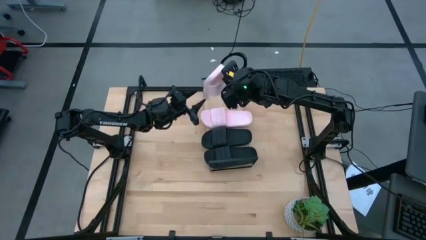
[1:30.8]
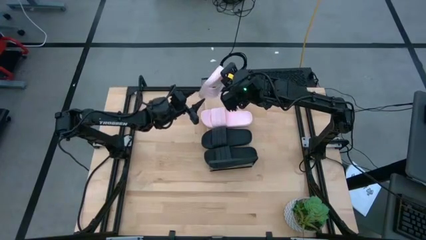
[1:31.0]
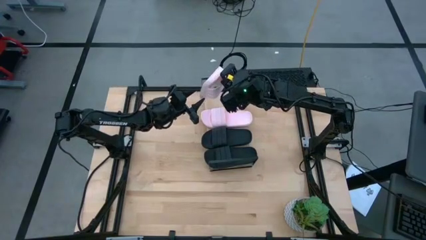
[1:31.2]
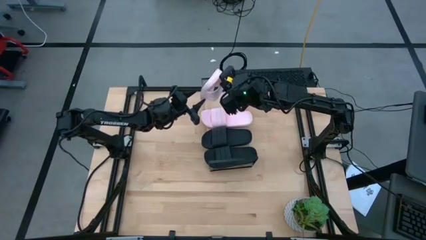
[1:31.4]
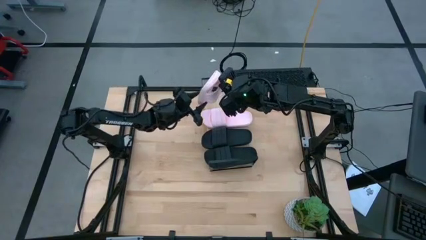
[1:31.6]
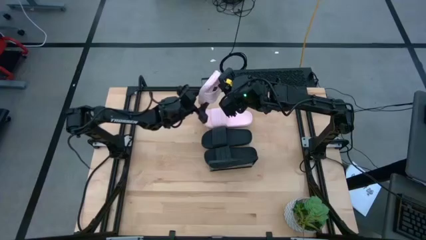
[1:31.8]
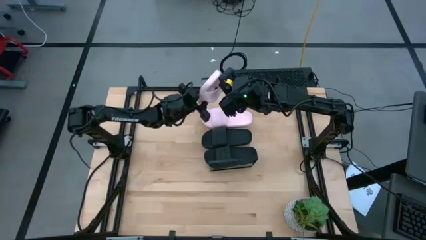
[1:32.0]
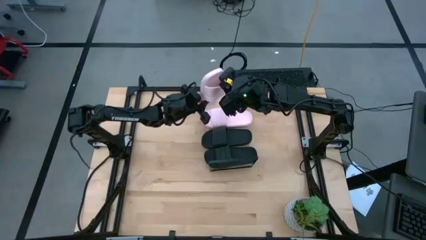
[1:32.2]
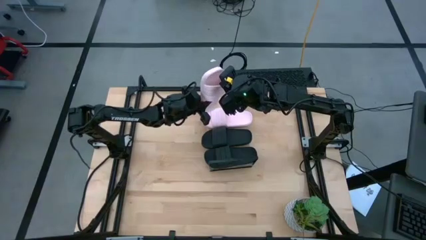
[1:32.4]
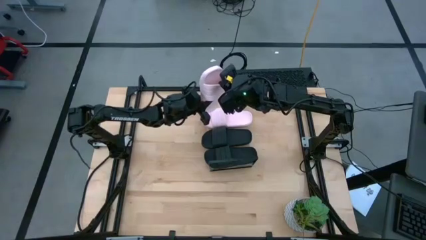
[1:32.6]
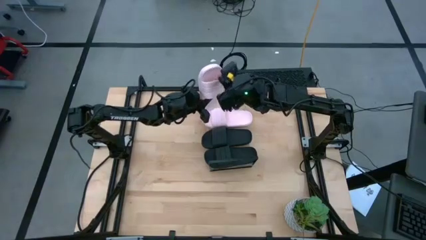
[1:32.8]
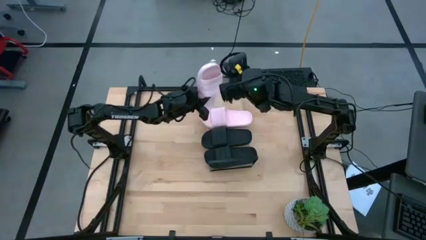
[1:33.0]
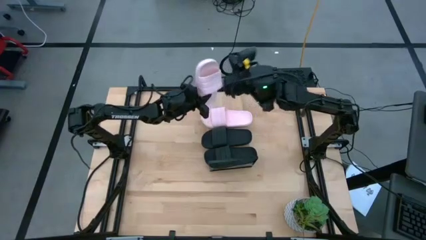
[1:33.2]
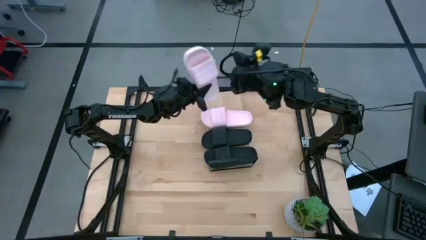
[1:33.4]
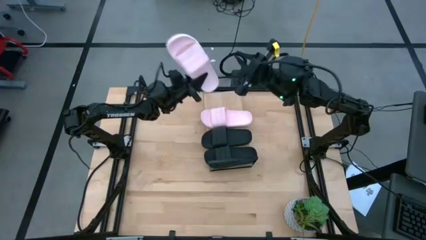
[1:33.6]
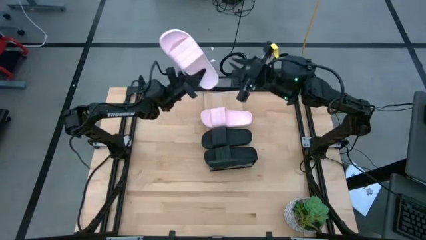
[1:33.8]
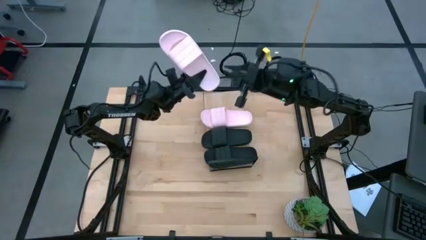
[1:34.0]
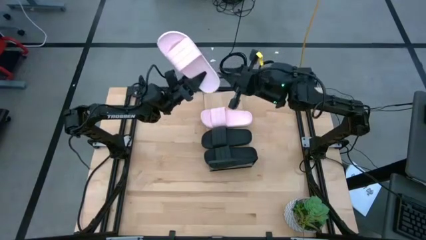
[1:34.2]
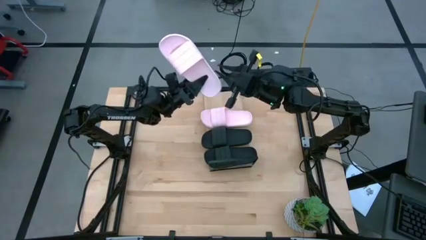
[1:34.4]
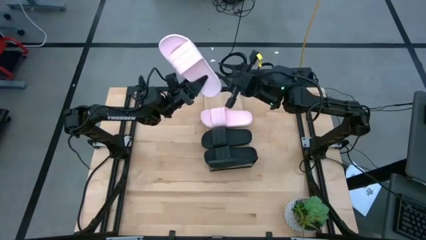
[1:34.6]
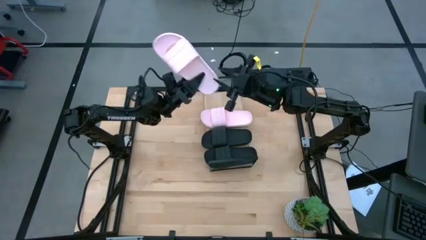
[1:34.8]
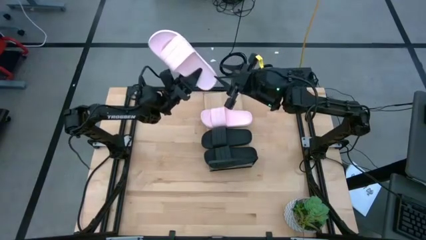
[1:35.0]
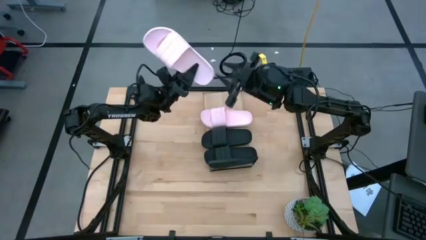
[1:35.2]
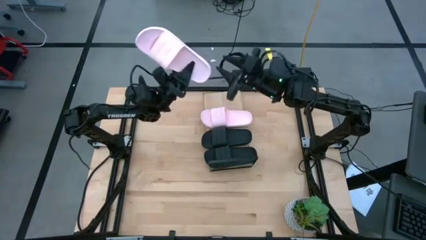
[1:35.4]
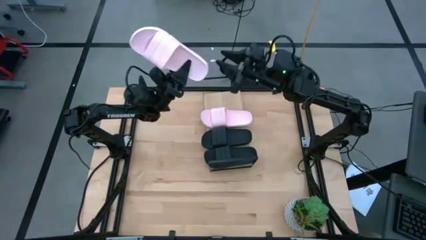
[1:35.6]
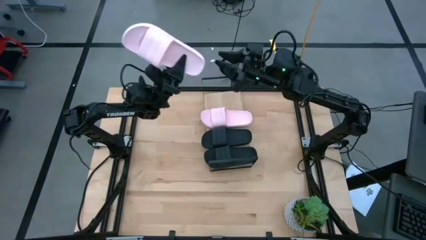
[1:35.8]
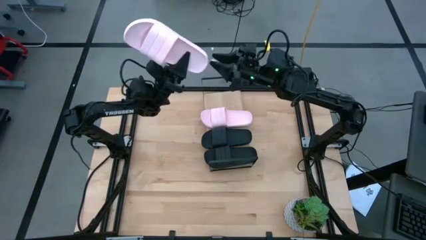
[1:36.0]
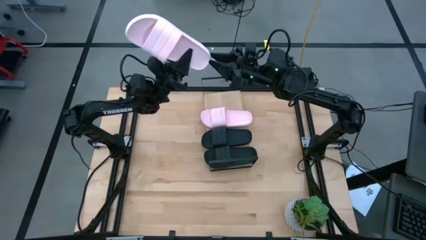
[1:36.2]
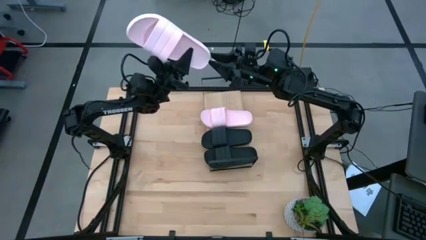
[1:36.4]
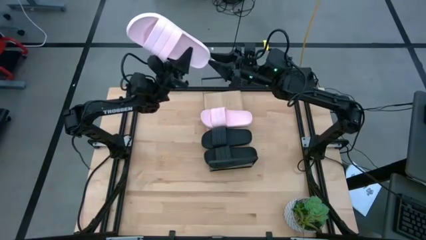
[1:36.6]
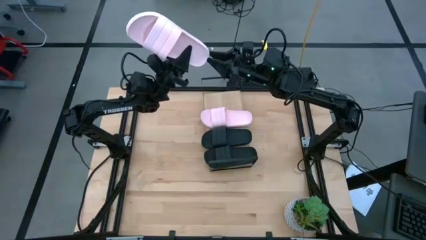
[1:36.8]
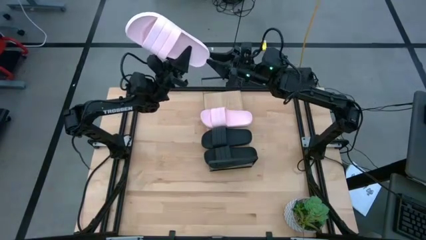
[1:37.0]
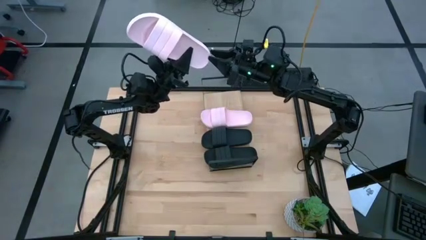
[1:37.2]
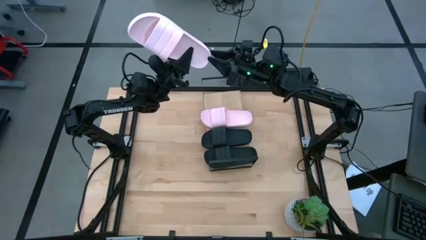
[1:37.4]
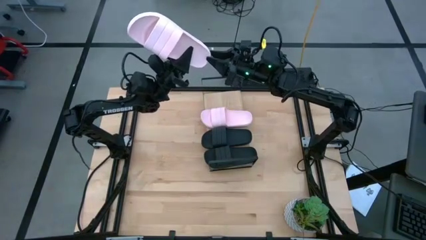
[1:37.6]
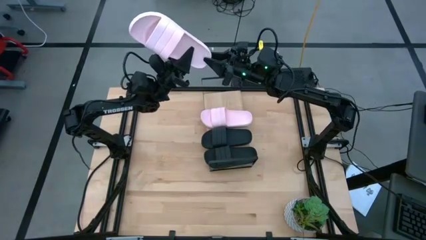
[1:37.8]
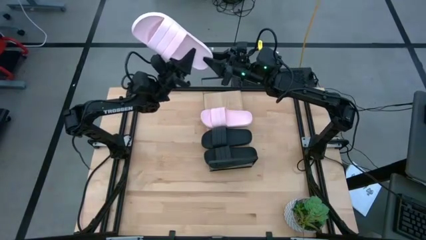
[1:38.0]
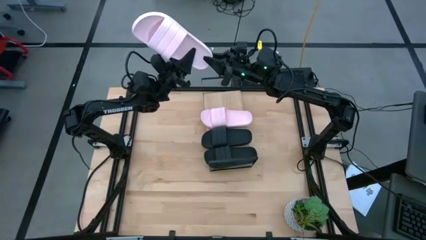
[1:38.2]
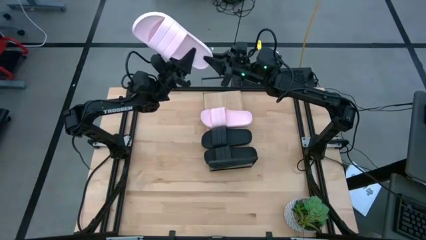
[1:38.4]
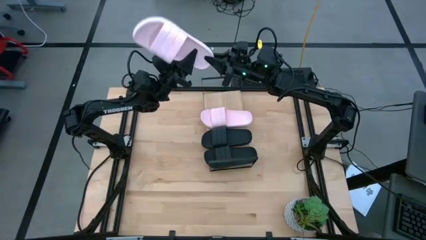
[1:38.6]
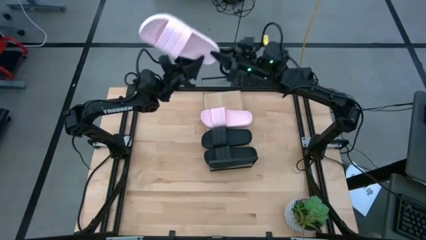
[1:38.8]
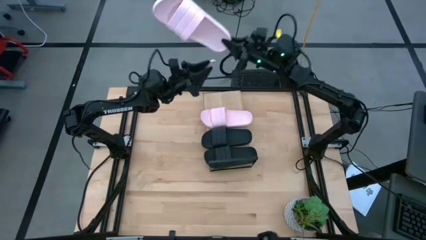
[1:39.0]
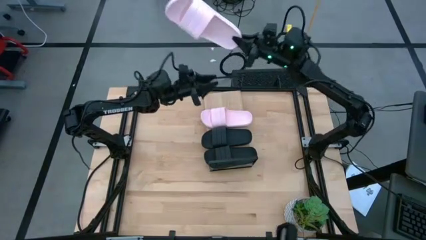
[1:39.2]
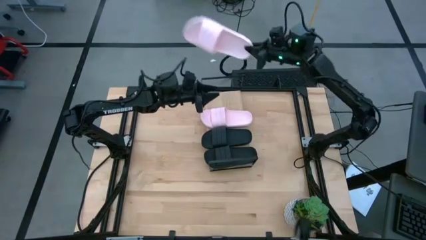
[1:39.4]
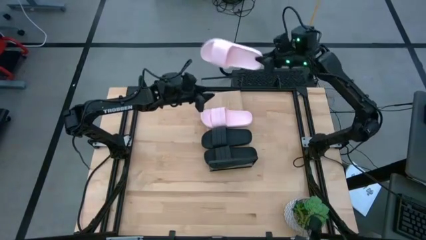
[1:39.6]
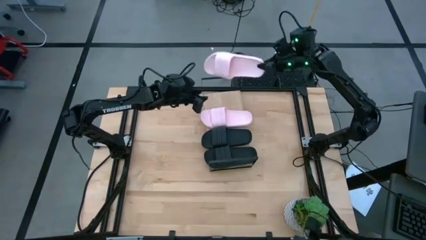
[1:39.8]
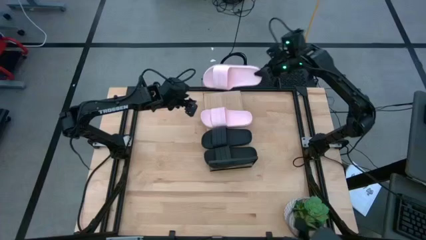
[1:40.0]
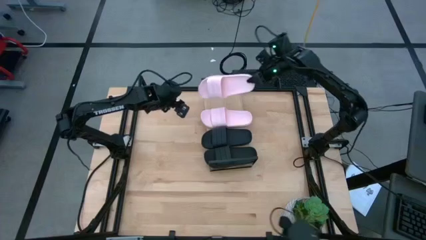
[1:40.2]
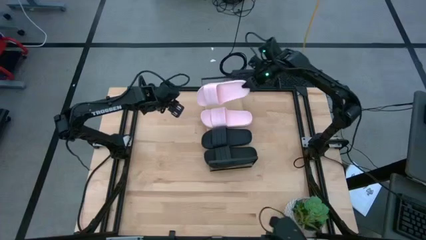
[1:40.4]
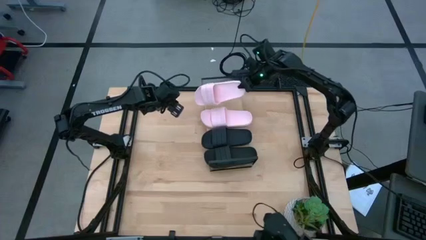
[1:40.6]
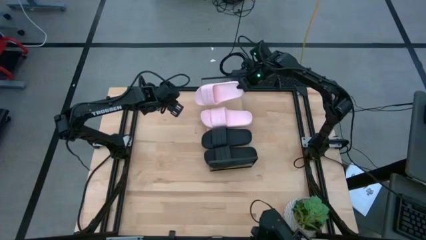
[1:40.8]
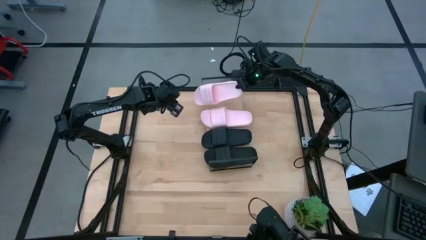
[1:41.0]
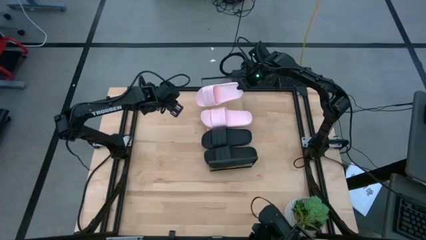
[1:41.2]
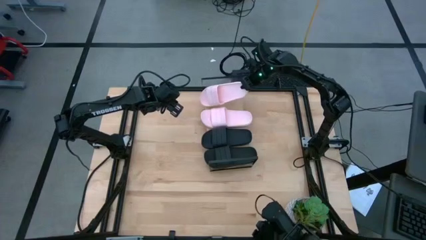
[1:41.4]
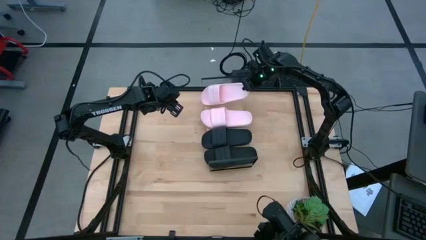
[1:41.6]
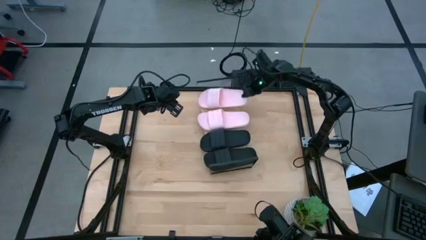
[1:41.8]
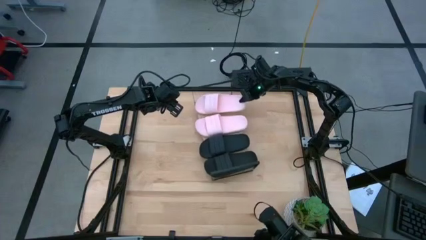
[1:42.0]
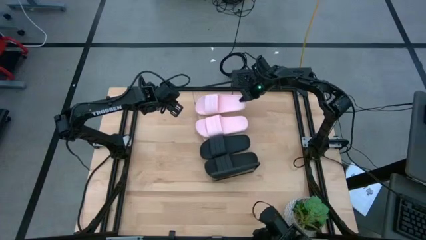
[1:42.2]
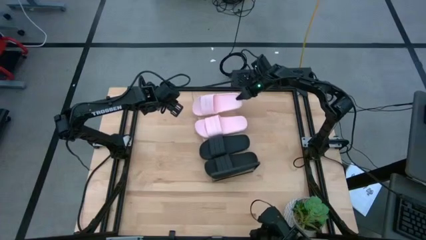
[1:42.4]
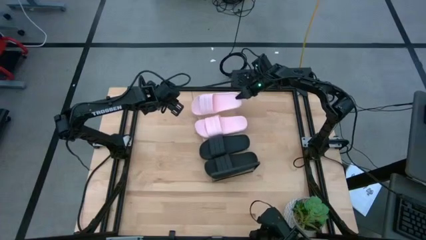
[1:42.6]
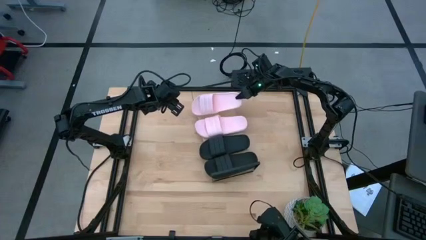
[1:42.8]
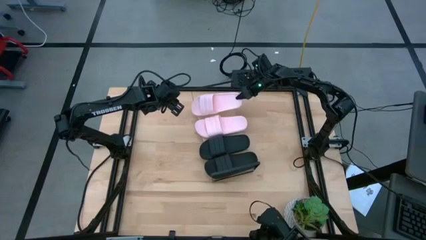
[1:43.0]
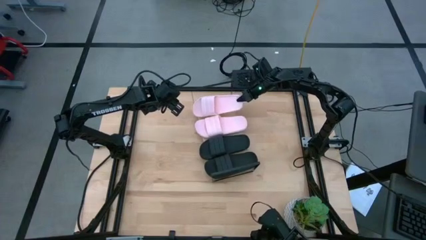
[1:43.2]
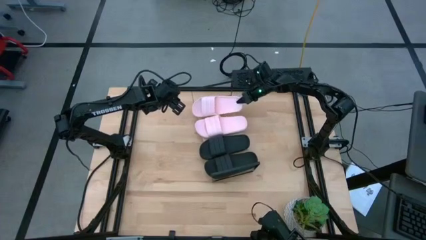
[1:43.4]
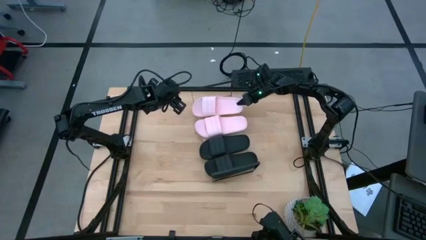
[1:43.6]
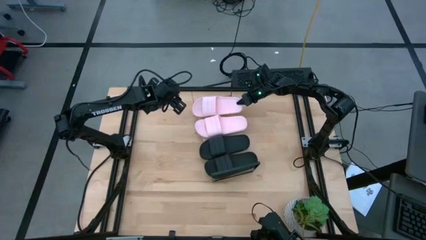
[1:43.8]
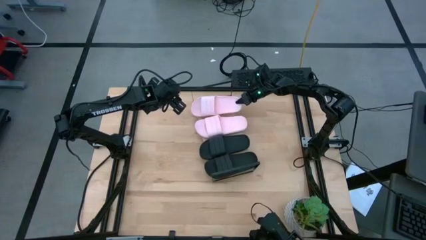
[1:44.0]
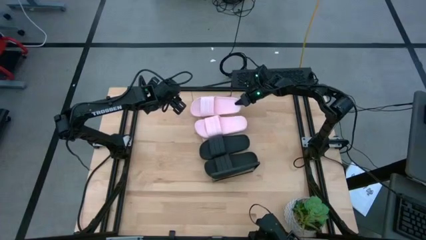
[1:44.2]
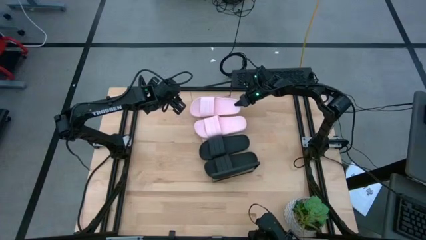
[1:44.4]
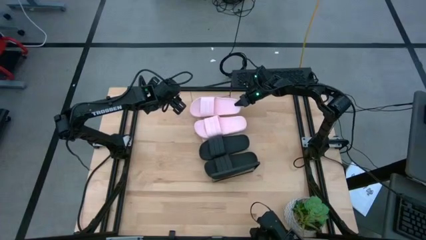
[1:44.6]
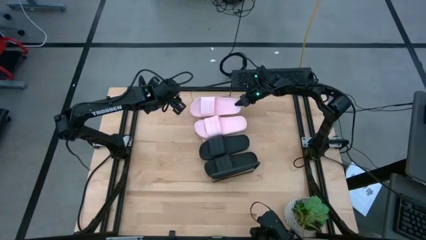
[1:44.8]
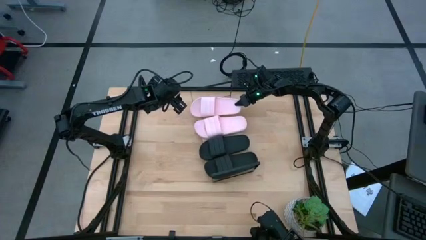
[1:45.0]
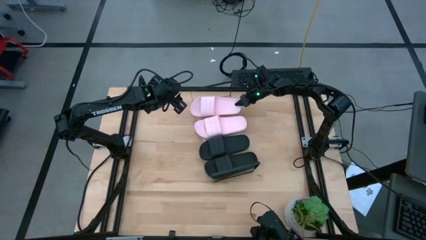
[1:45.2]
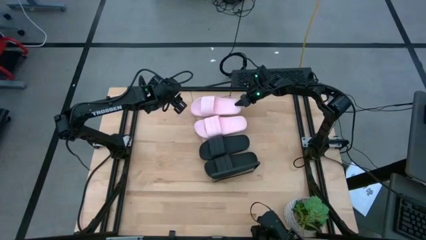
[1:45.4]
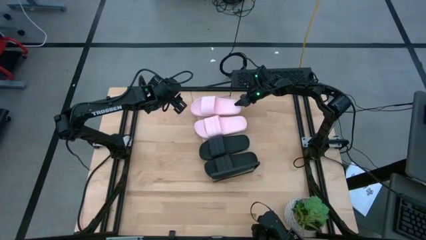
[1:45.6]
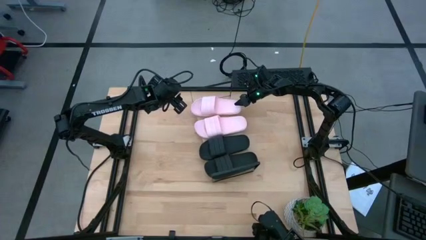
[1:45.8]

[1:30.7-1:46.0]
Task: Pick and place slides into the shelf
Put the pink slide on the shelf

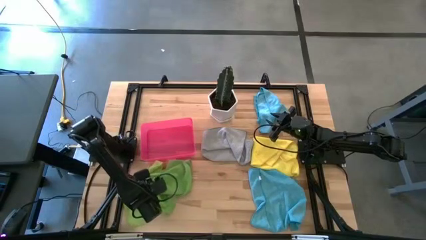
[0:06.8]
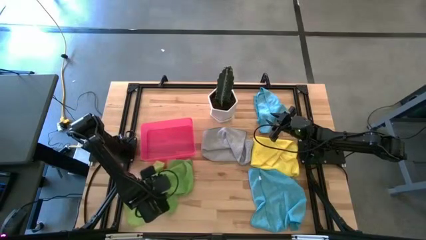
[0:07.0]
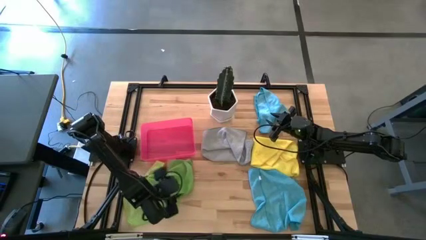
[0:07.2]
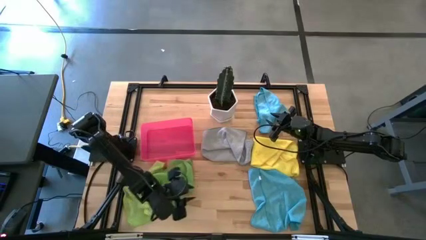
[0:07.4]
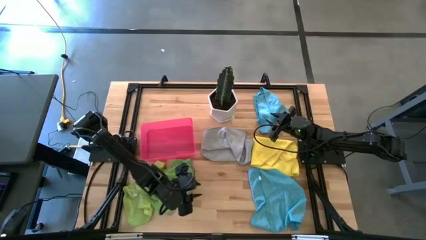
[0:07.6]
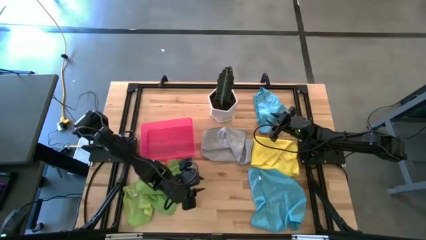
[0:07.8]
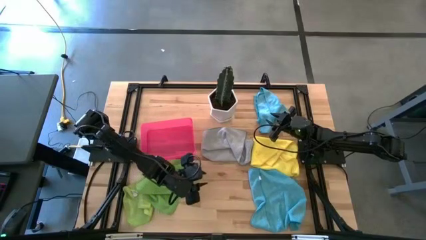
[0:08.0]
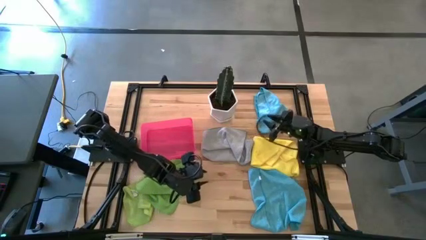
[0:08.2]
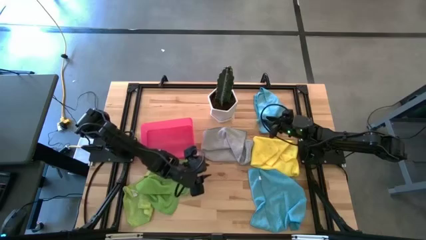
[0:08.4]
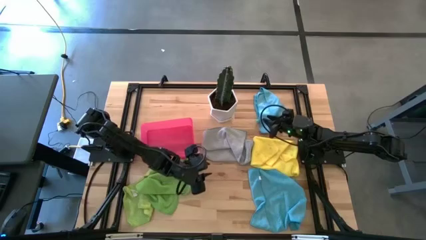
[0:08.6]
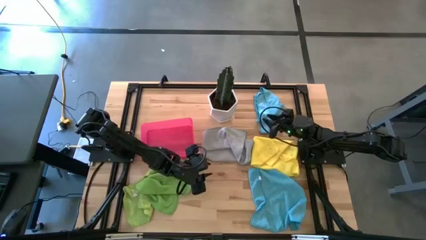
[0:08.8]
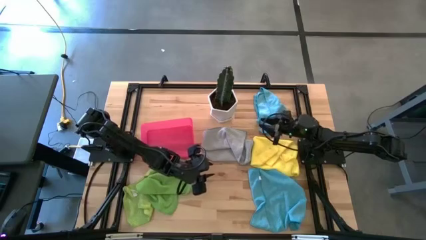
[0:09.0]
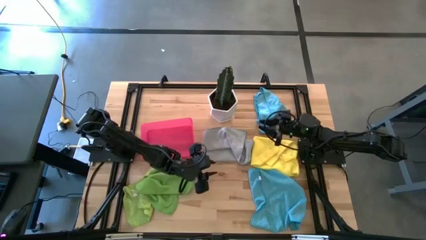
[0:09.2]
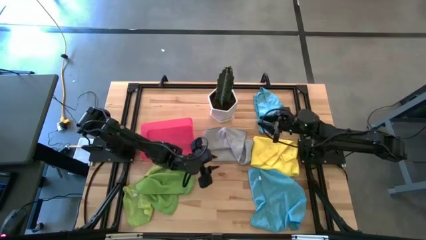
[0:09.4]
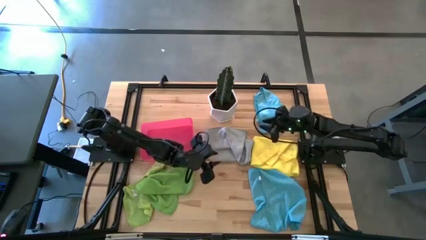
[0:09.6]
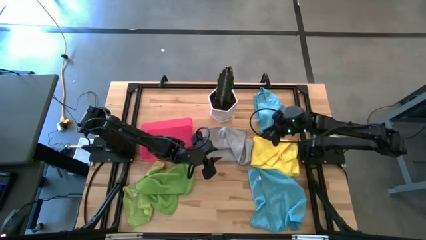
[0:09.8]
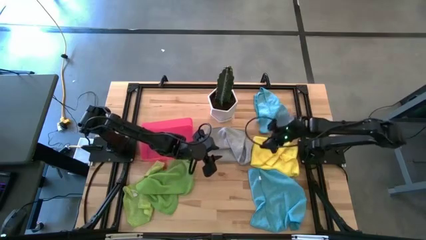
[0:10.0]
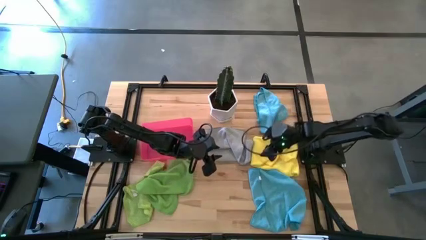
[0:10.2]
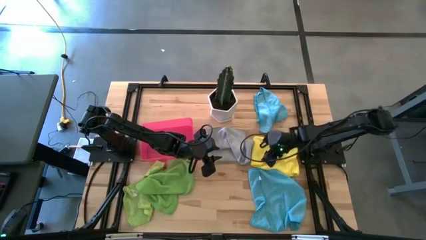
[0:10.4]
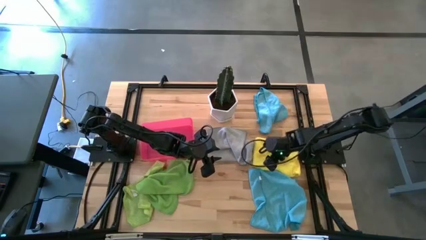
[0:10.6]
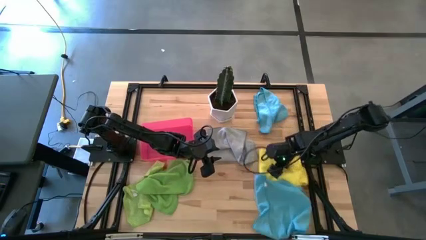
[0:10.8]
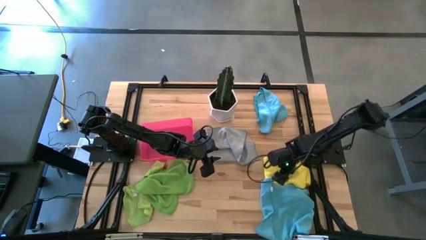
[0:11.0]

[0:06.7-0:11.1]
Task: Fold microfiber towels
Adjust the colored microfiber cloths on the table
